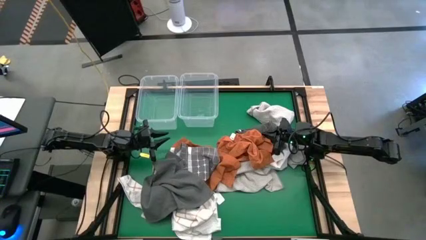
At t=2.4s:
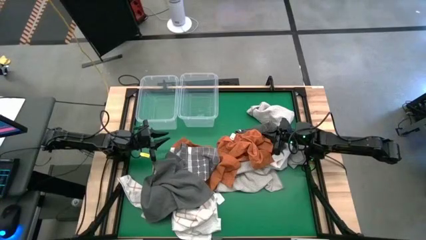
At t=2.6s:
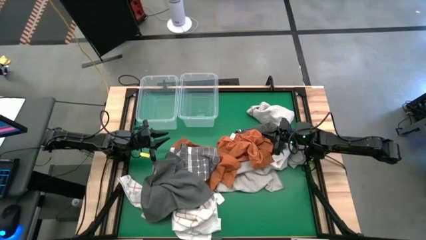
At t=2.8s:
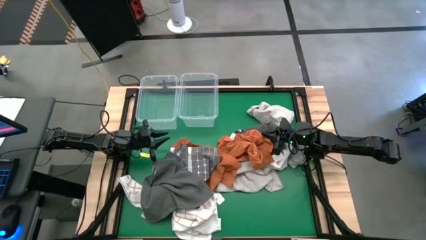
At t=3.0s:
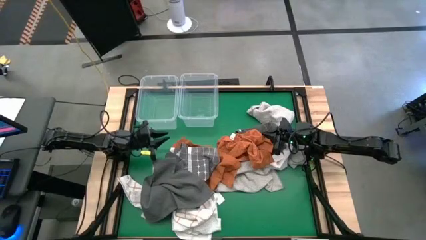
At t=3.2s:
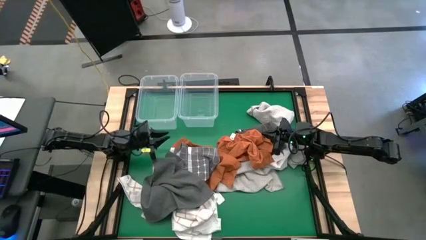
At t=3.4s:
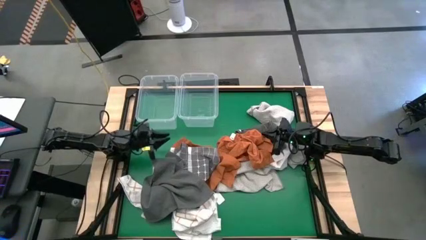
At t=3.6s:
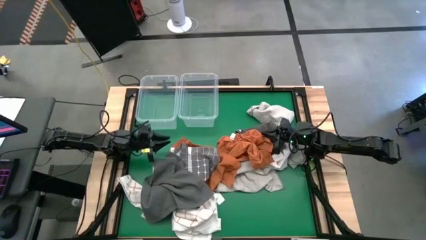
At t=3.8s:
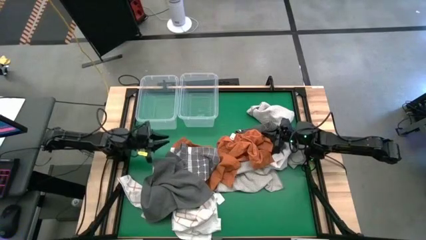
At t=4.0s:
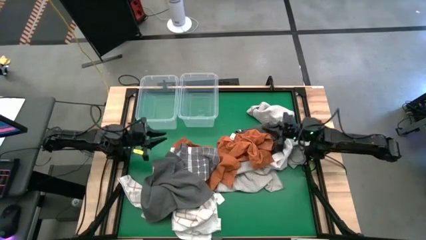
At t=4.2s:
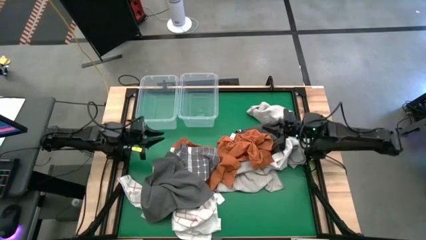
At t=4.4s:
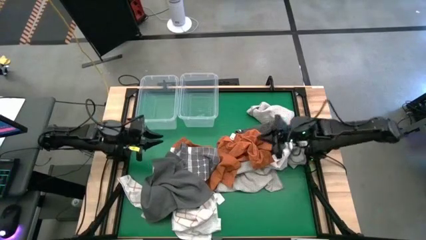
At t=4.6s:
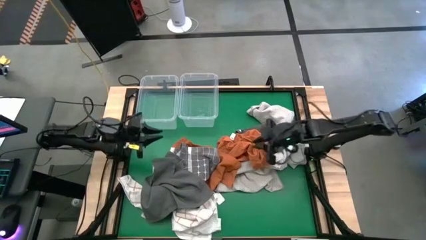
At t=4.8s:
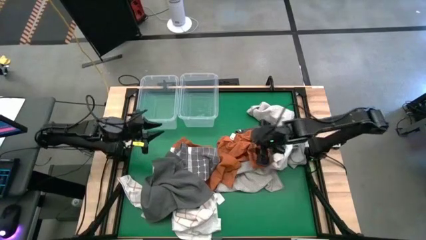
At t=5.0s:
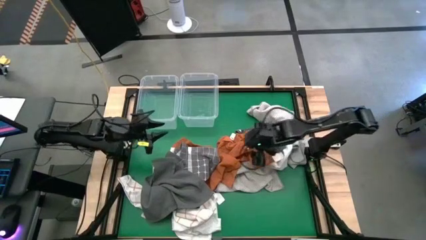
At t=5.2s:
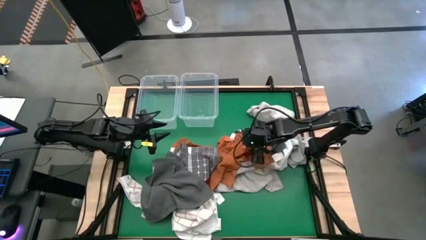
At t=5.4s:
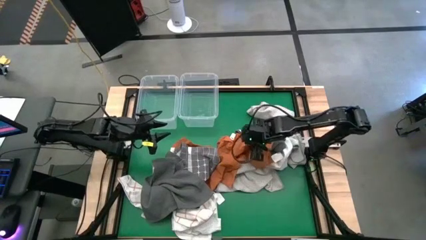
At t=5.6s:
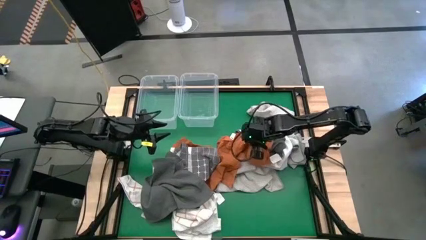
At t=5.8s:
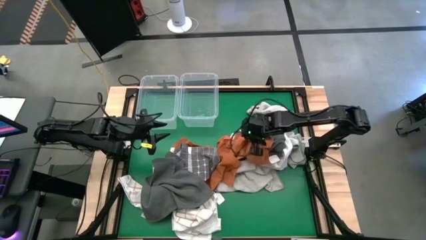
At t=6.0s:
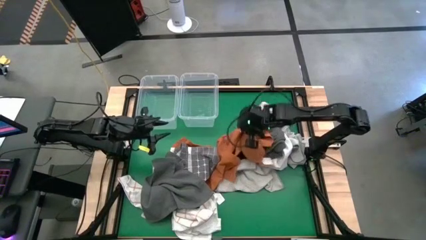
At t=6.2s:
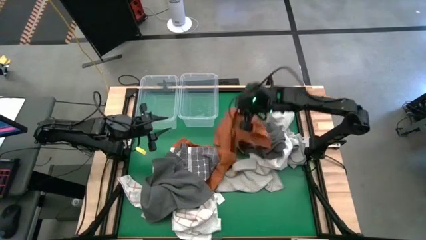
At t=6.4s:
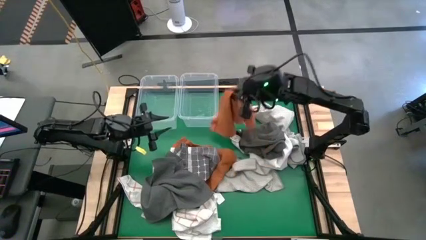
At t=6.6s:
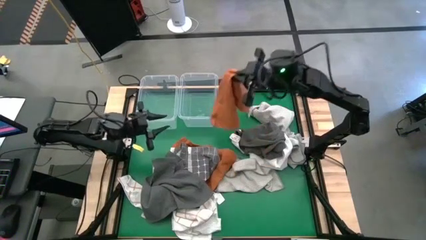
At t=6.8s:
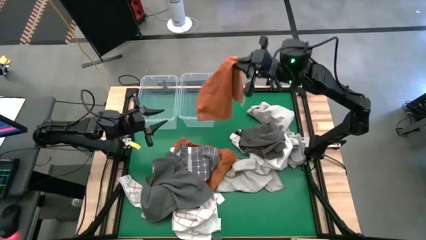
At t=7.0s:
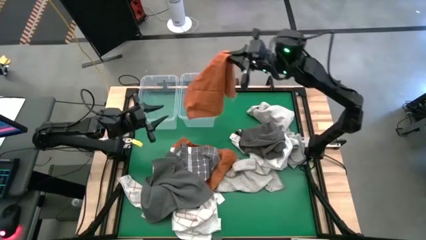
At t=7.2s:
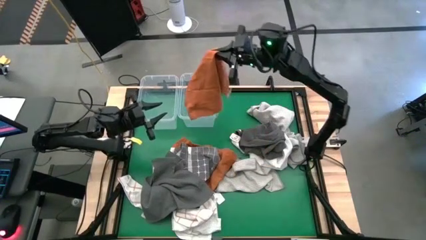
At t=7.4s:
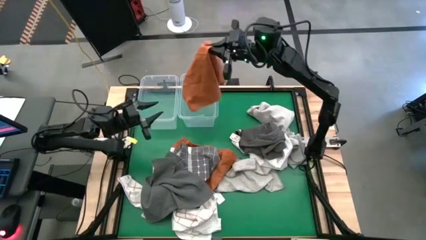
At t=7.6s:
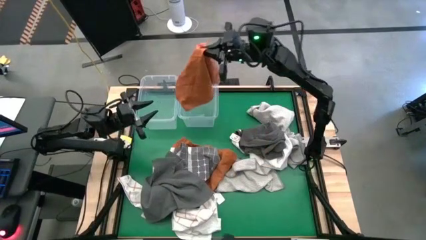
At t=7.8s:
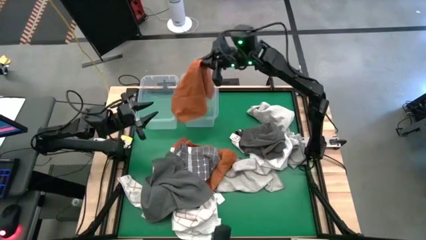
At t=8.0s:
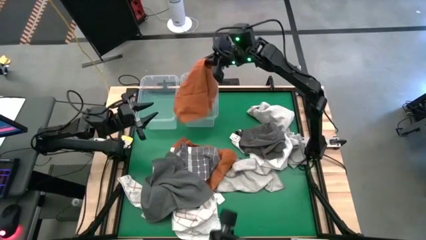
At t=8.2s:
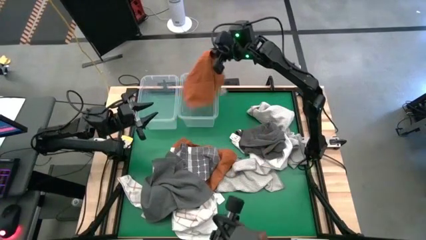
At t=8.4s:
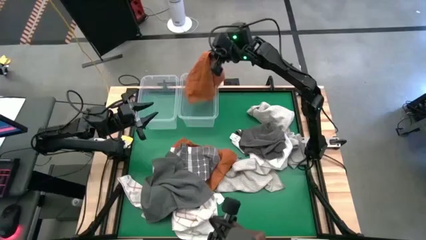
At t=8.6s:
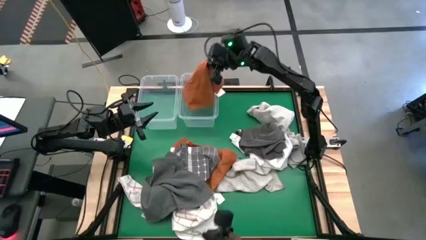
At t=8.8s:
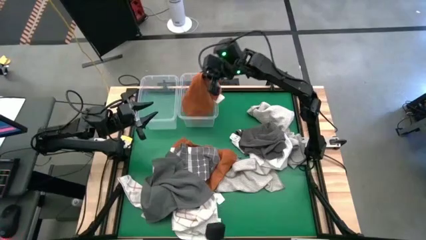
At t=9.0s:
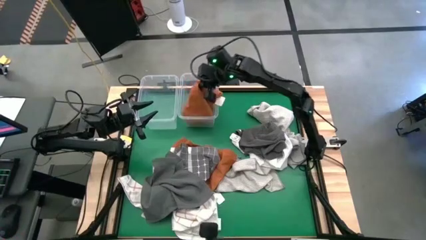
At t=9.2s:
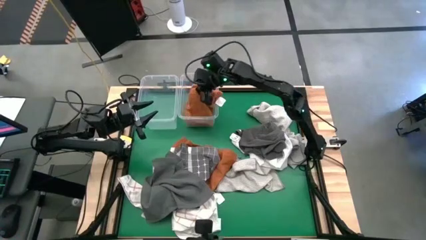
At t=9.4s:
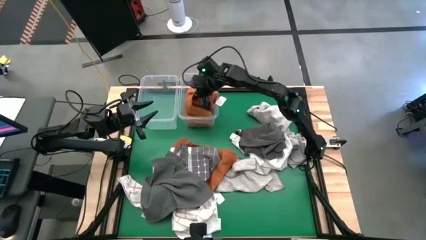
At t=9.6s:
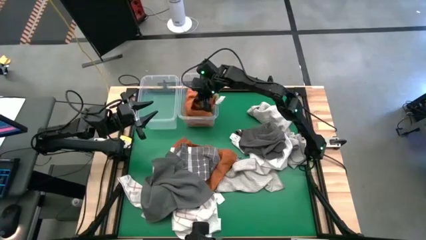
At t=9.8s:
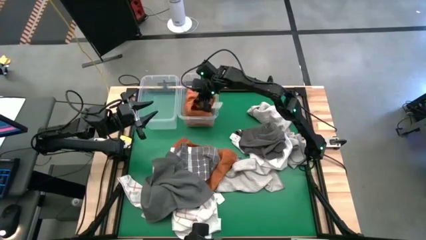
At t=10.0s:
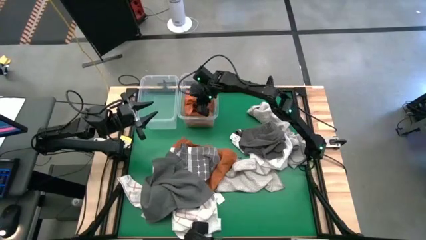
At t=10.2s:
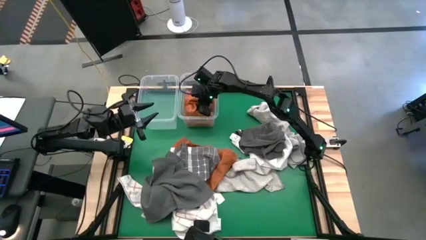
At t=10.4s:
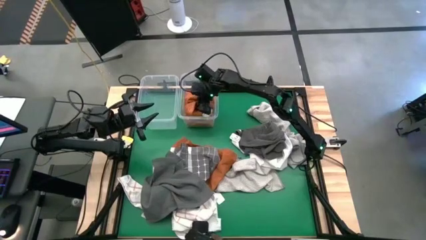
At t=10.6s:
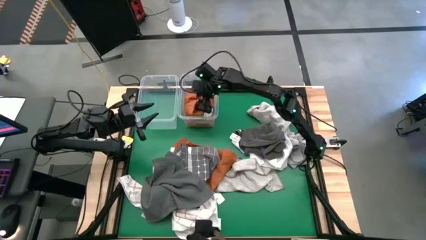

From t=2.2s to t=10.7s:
Task: Sort towels by color in basket
Put the orange towel into the right transparent bin

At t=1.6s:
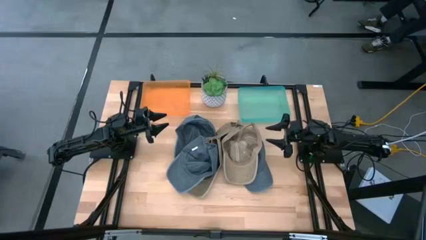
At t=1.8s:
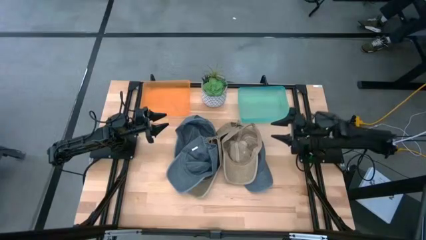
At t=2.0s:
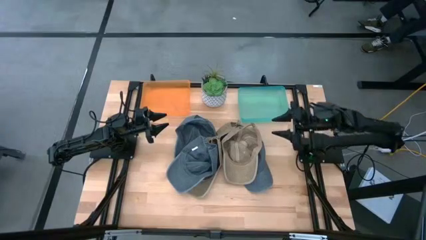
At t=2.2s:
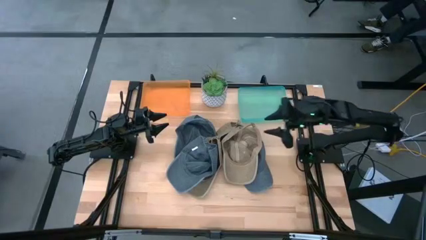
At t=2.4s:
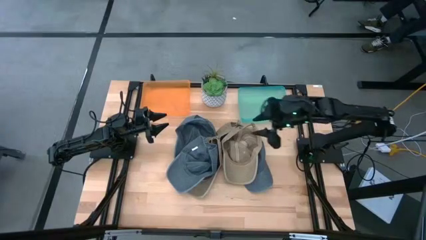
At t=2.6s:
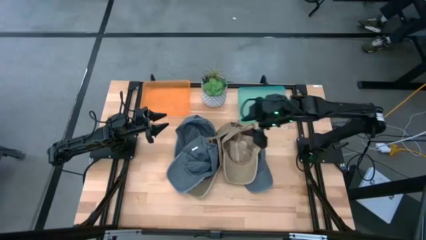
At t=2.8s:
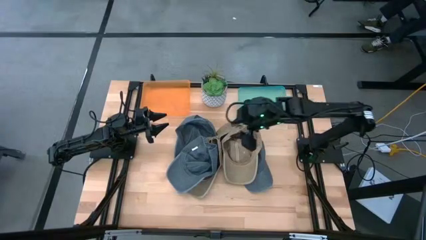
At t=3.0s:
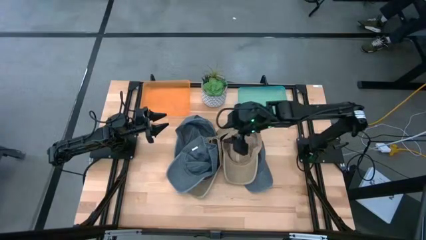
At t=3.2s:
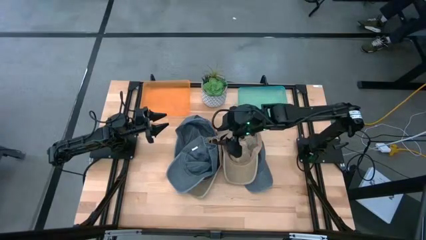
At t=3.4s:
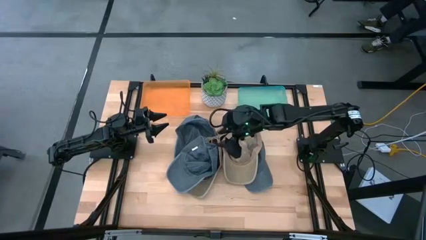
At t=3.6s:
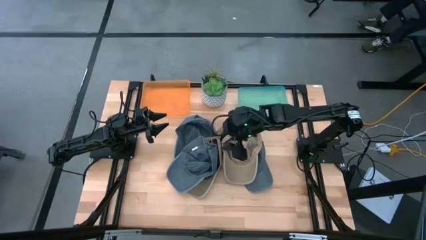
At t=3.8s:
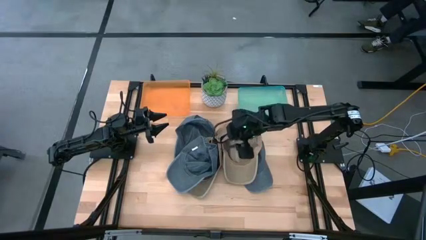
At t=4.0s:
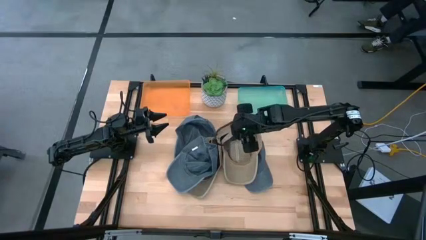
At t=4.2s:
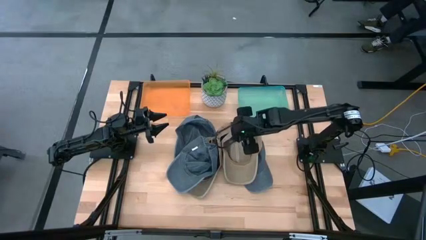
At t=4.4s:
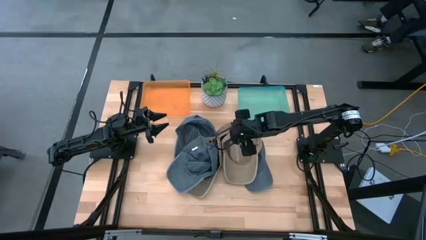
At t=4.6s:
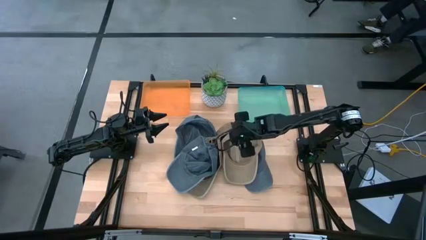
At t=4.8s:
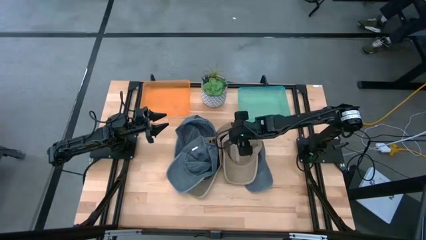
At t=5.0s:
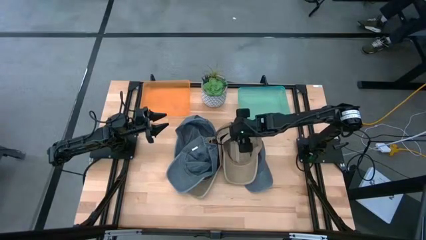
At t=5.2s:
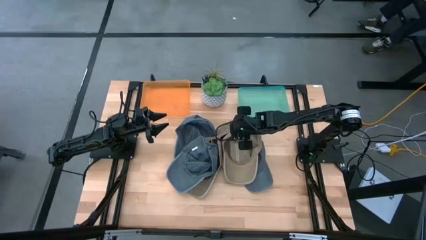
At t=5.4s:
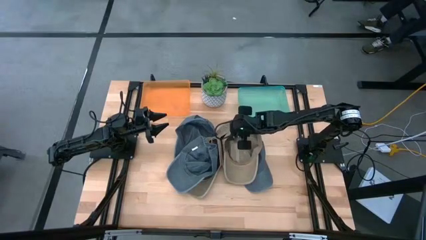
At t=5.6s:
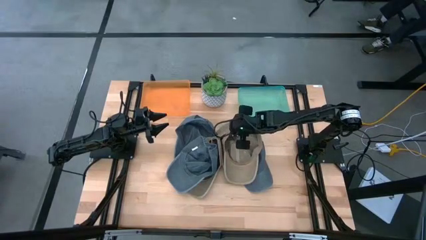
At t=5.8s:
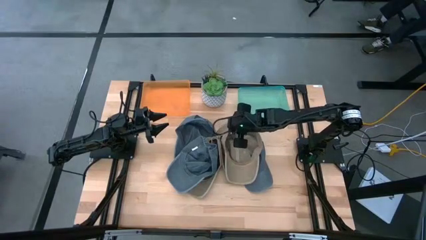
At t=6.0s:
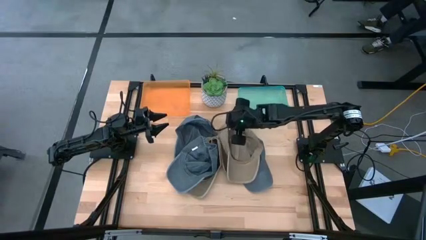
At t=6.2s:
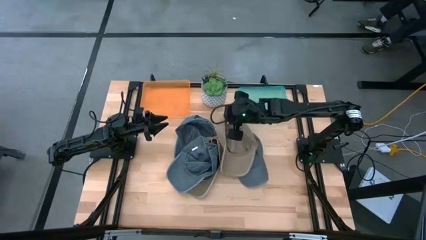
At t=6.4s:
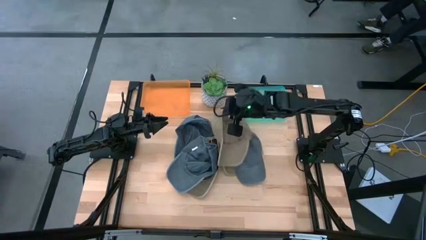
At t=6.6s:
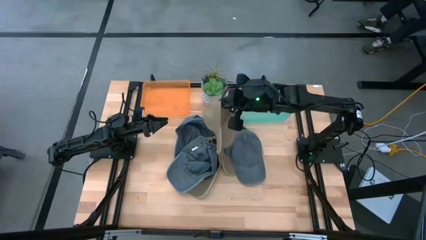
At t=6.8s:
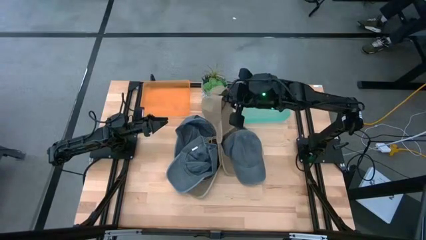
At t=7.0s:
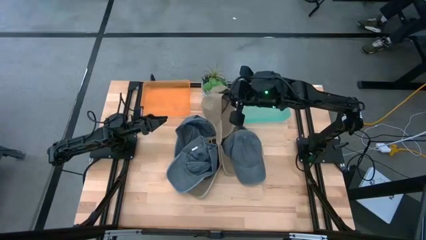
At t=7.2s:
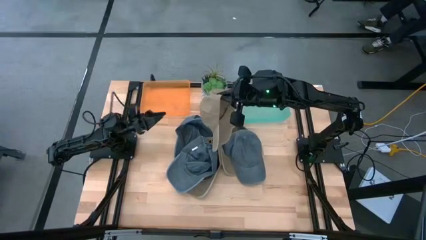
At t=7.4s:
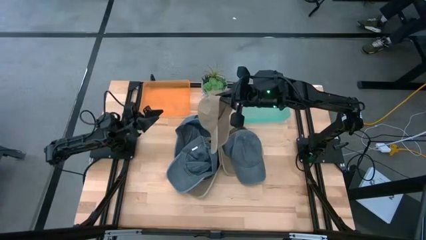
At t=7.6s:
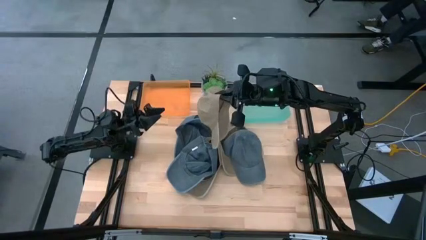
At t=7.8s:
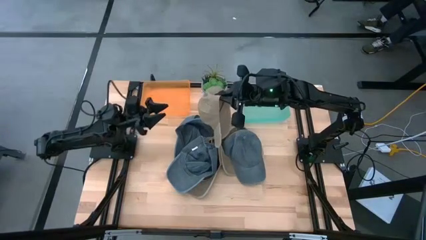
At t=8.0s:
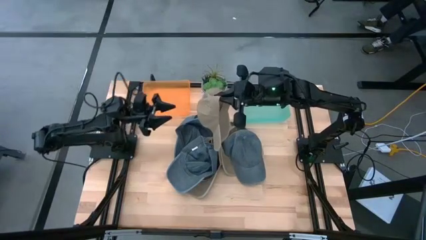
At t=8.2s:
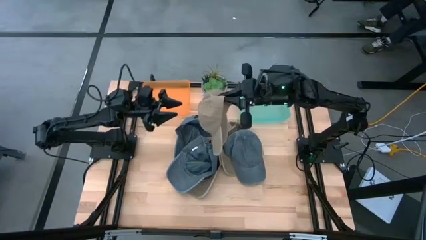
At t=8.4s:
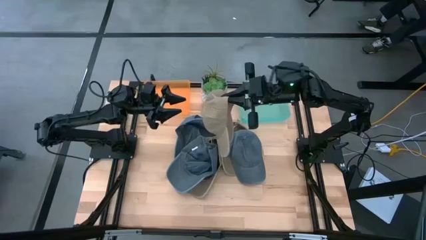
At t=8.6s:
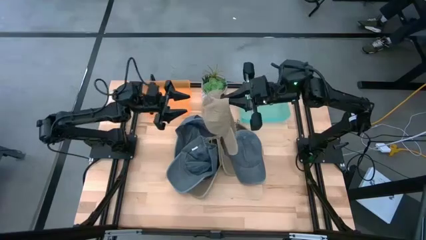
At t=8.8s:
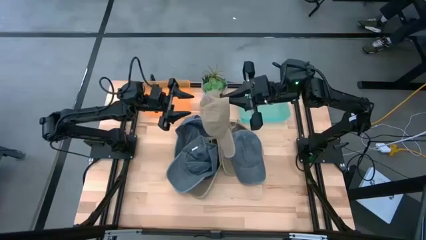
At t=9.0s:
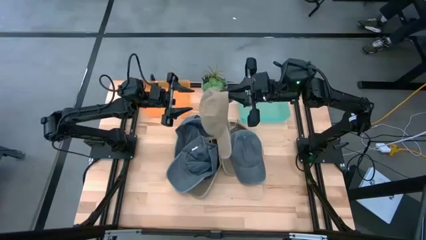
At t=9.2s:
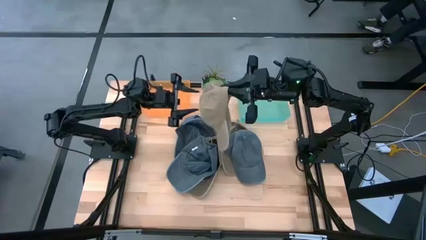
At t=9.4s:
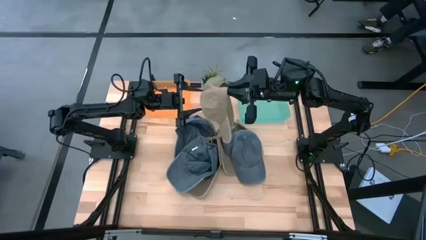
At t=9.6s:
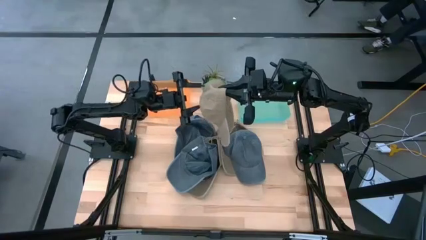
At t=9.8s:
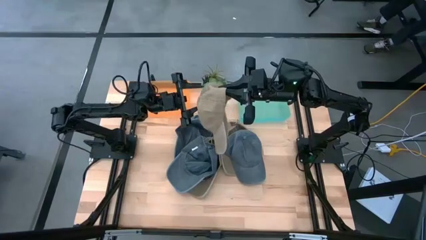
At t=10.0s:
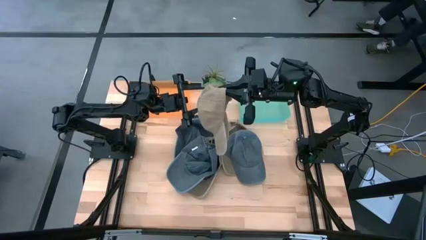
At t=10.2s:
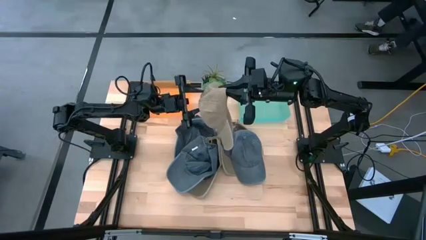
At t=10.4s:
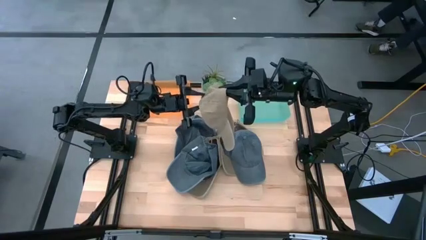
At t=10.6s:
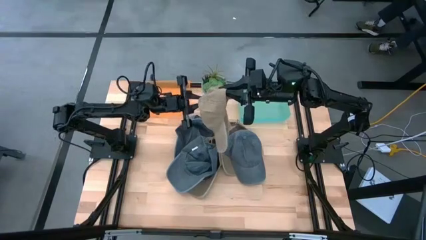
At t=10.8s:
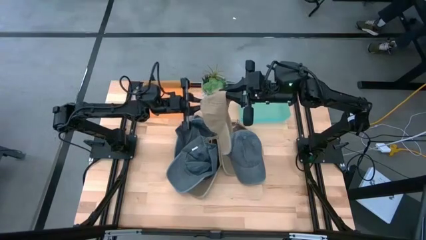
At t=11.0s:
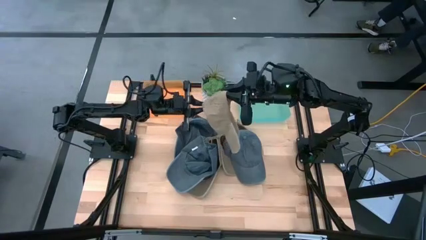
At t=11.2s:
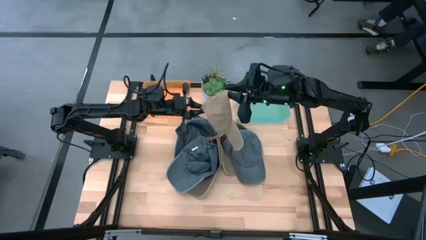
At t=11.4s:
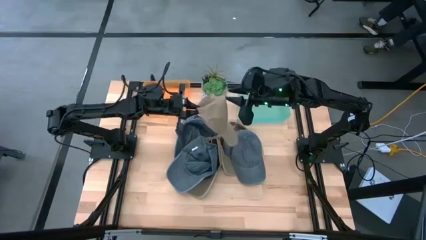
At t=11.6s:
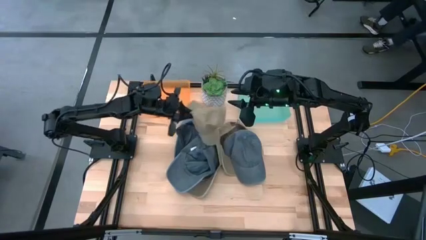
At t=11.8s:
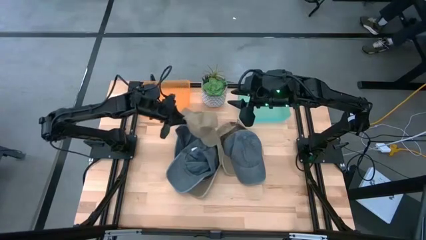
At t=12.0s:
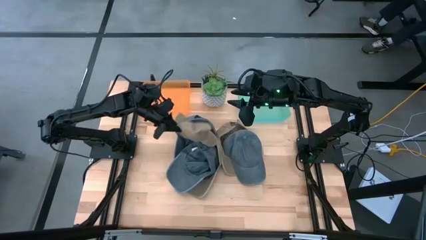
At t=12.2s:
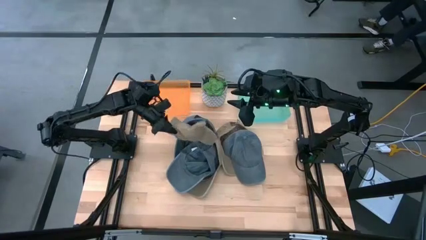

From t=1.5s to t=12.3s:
Task: Pick & Place hat
Put the right brown cap into the orange bin
